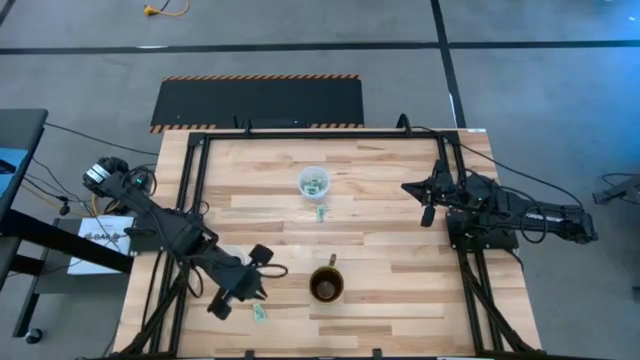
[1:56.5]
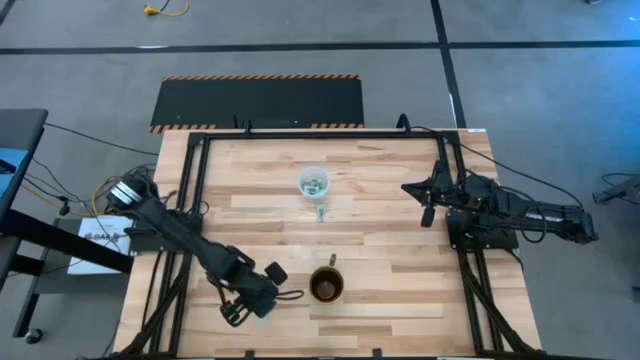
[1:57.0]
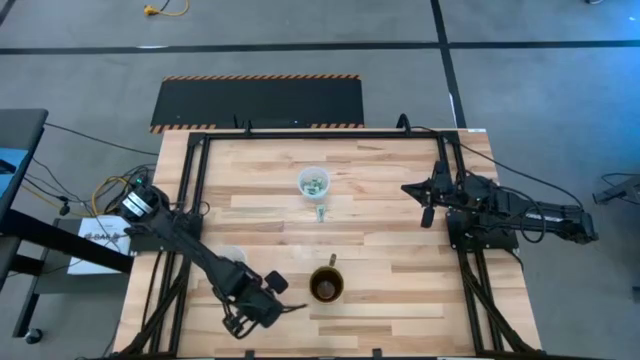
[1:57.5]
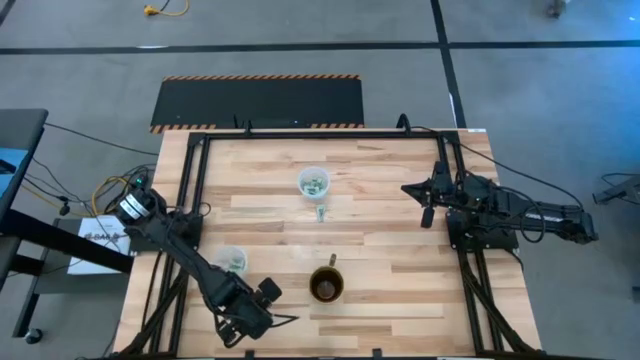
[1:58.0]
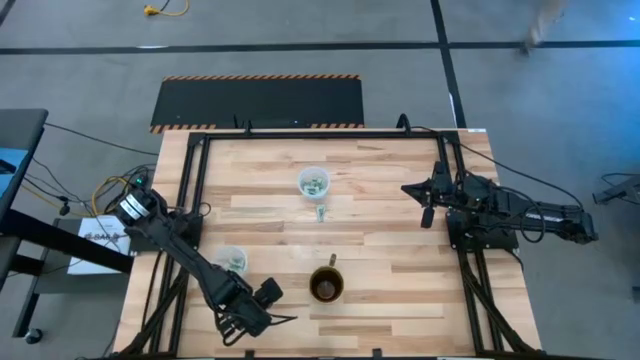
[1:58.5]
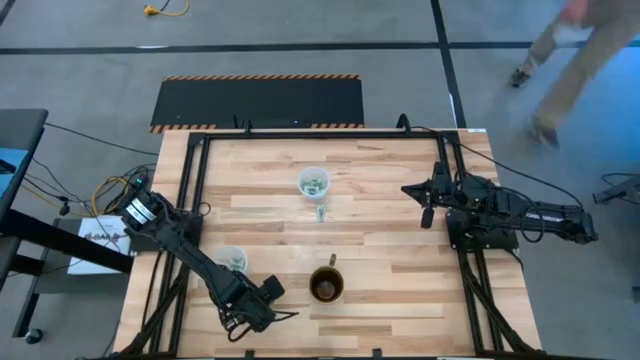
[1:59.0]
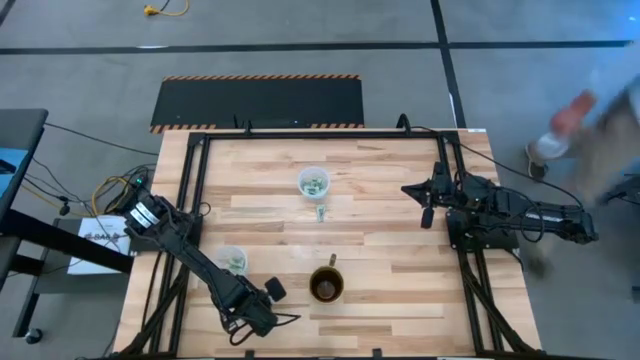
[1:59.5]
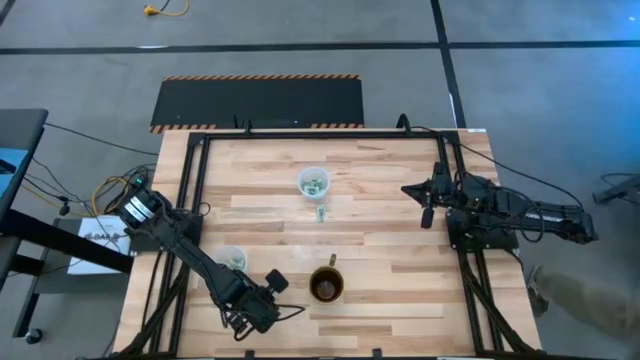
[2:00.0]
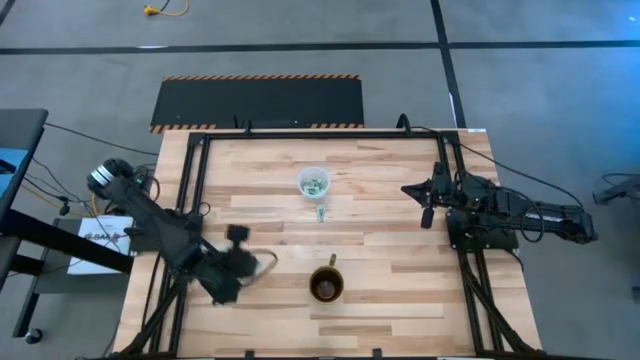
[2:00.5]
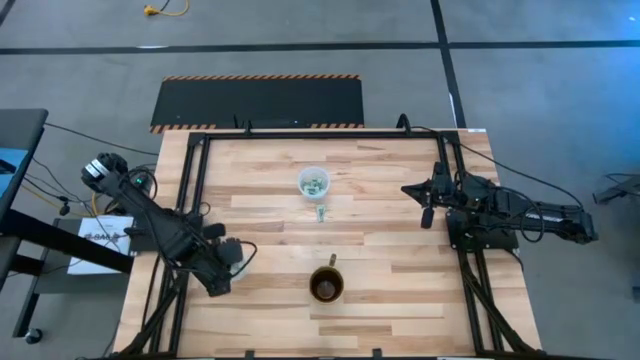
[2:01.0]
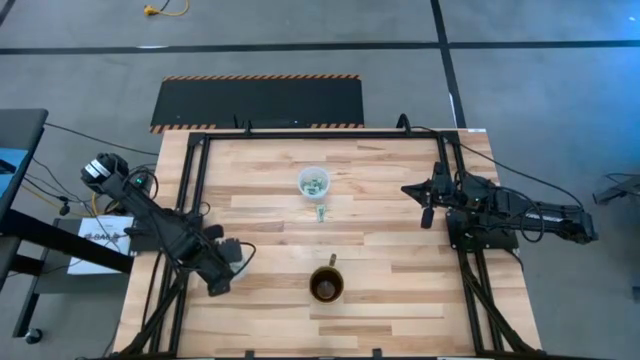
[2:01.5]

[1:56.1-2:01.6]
Task: Pick and place items into bin
Put the stevia packet into the bottom transparent bin

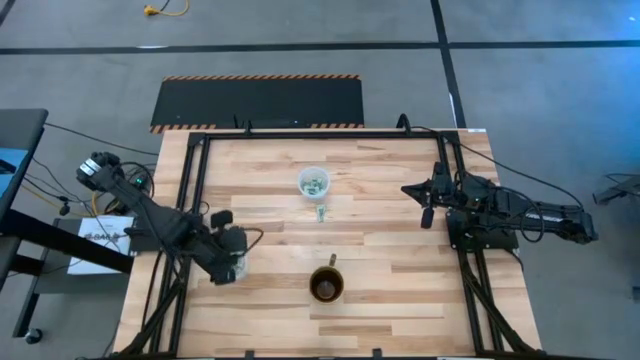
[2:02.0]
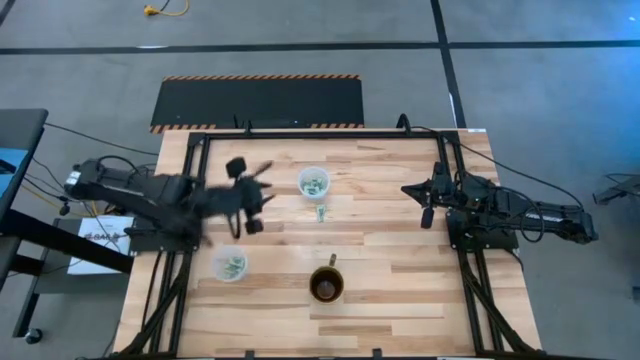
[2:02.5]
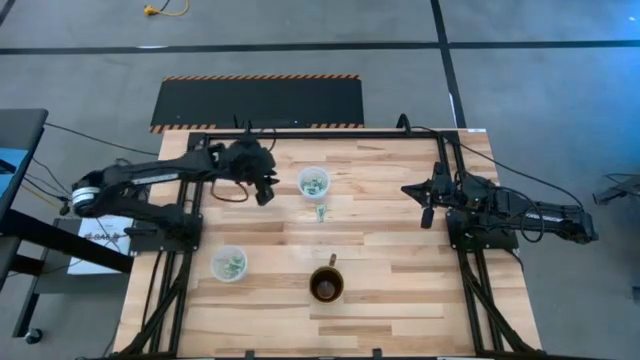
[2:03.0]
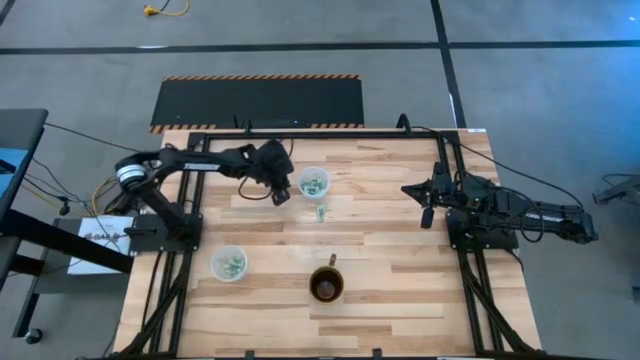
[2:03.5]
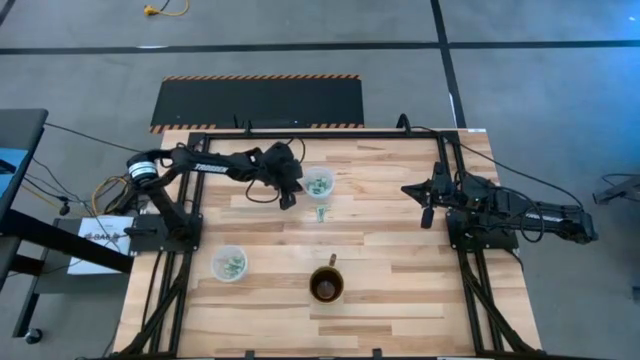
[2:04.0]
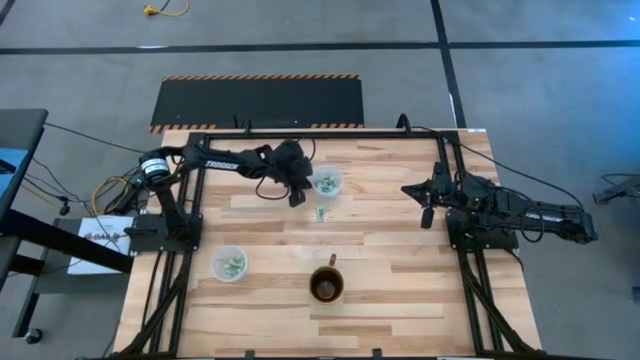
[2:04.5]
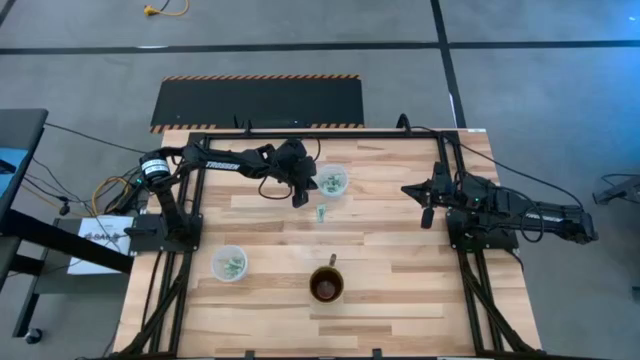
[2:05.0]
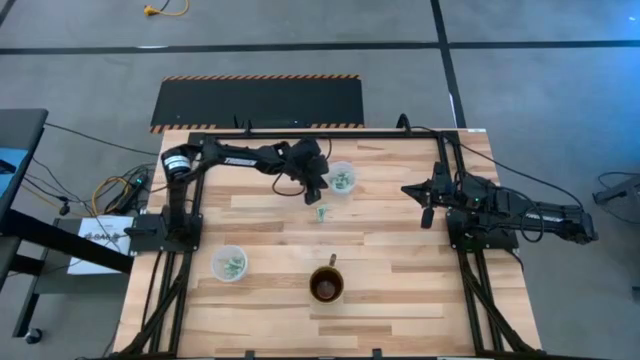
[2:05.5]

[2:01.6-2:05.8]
Adjust the top transparent bin

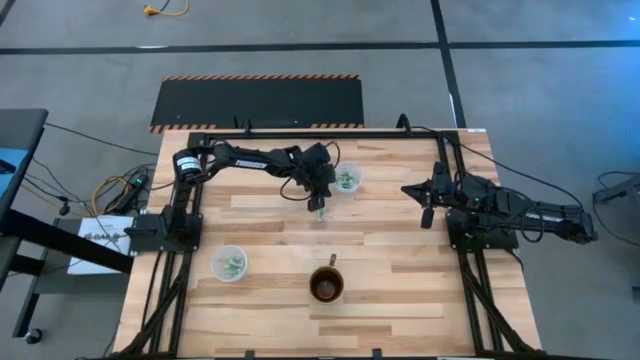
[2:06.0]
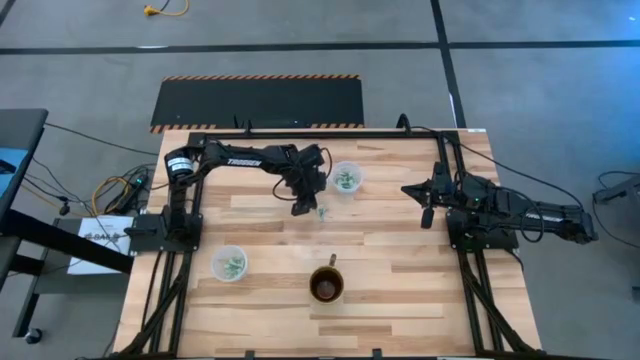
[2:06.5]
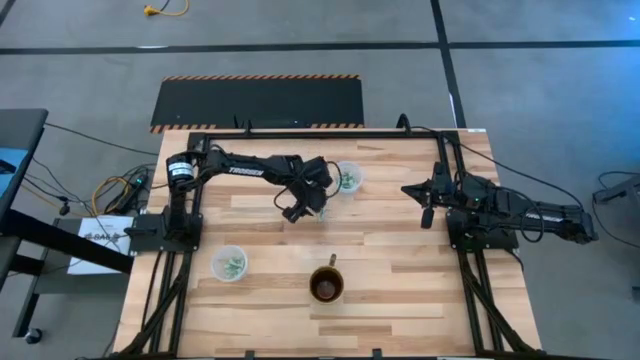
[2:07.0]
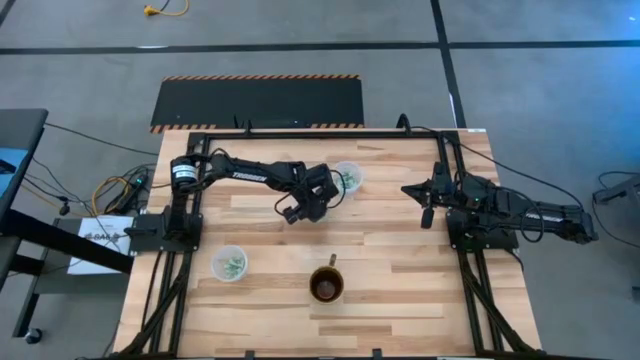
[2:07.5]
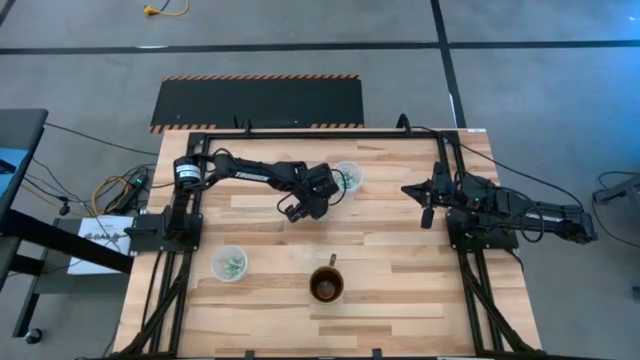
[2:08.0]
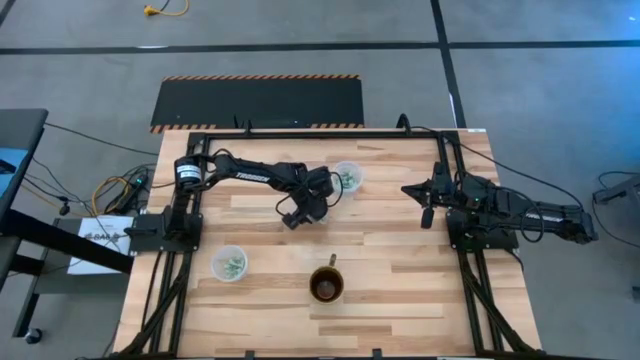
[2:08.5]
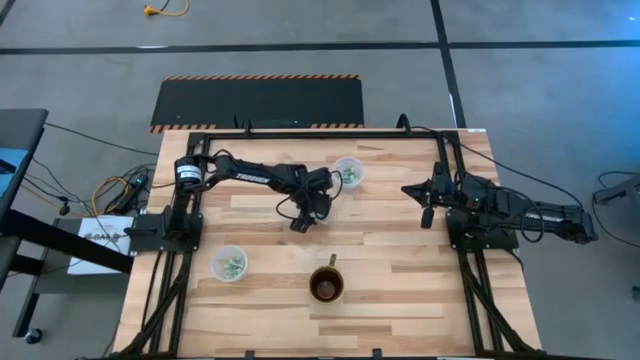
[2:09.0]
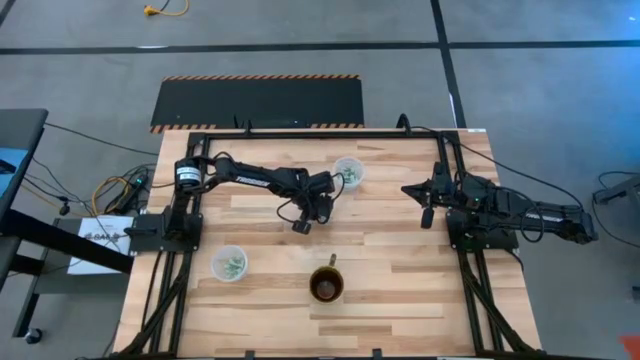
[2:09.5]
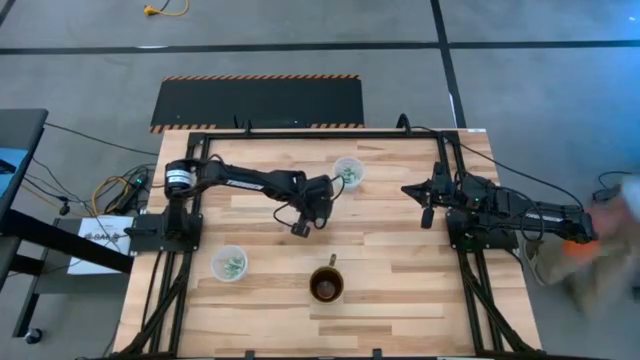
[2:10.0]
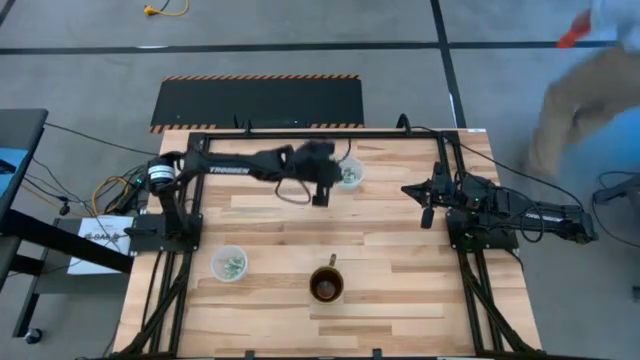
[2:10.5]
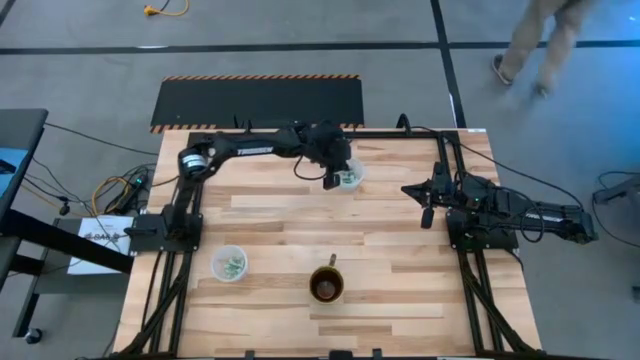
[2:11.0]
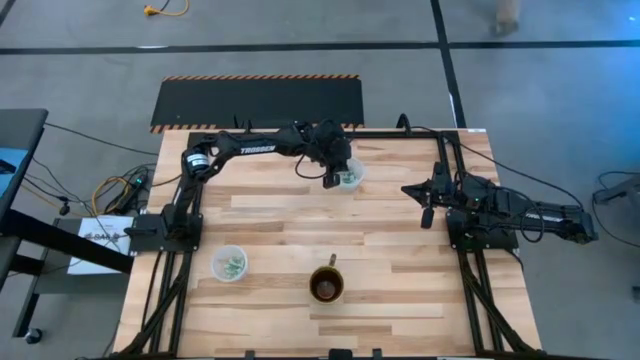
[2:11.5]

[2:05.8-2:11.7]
Put the stevia packet into the top transparent bin
